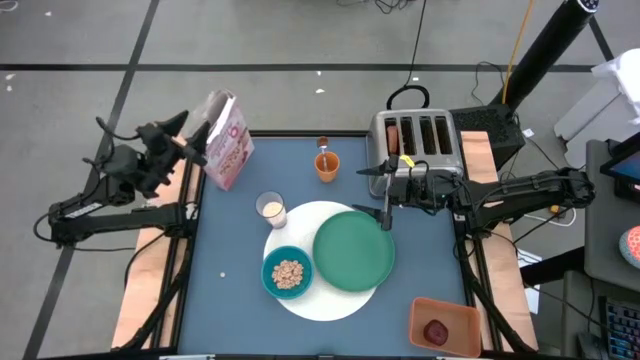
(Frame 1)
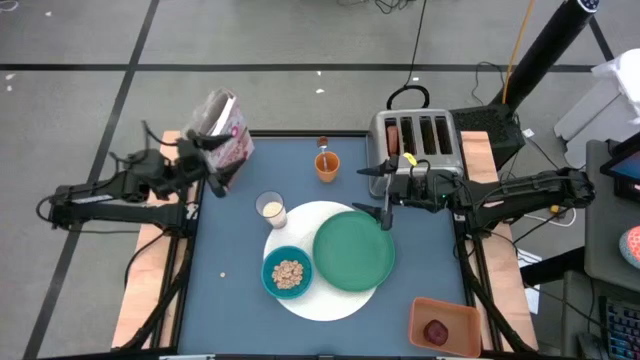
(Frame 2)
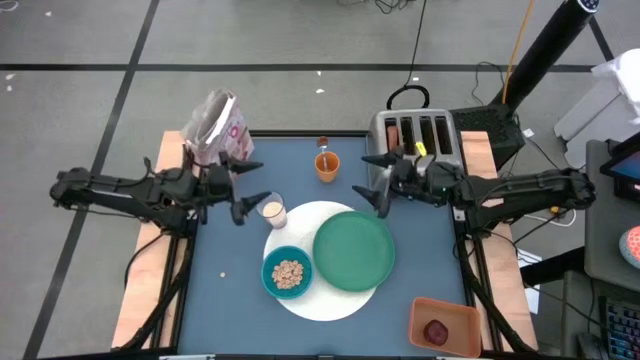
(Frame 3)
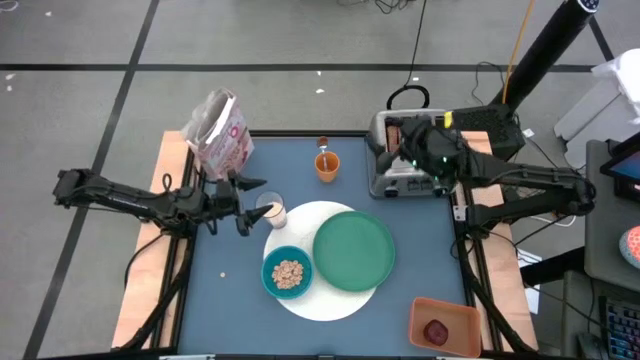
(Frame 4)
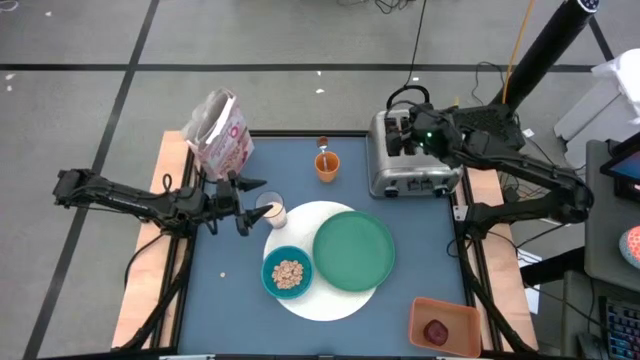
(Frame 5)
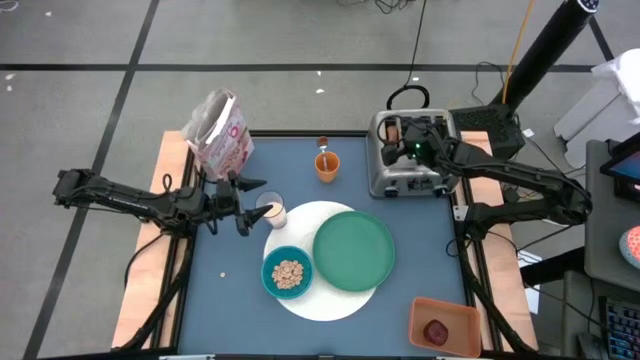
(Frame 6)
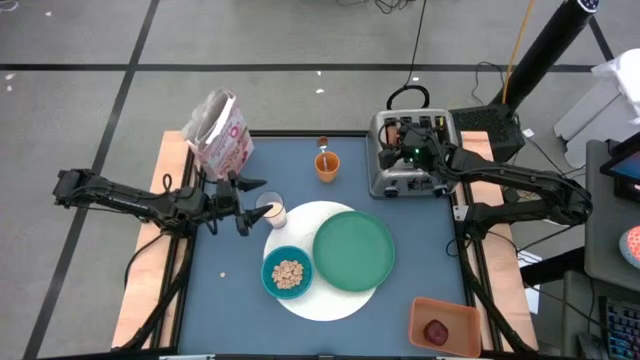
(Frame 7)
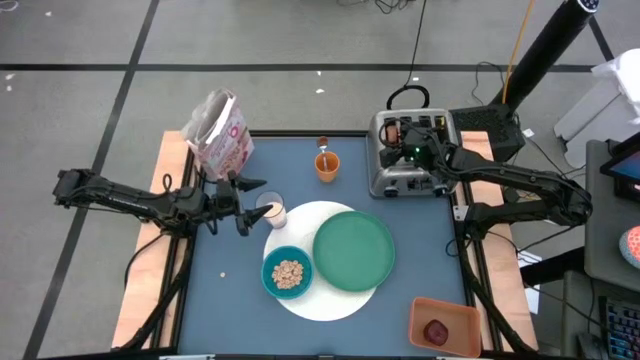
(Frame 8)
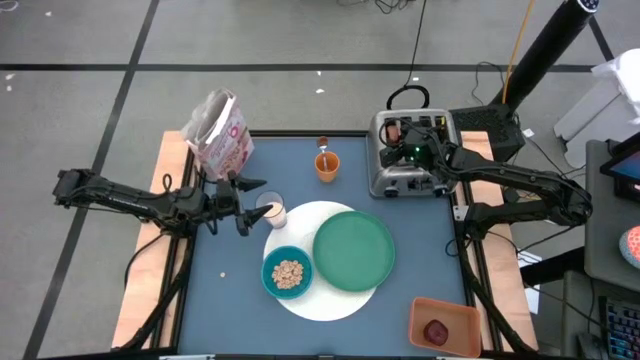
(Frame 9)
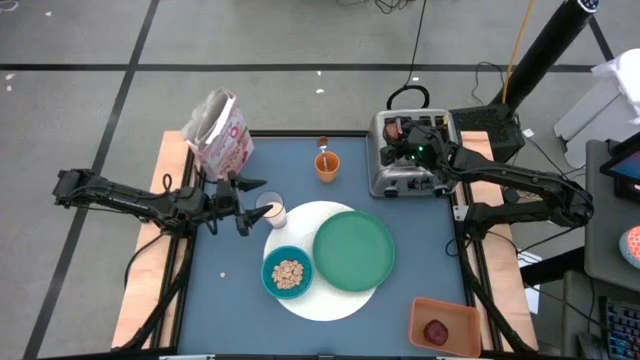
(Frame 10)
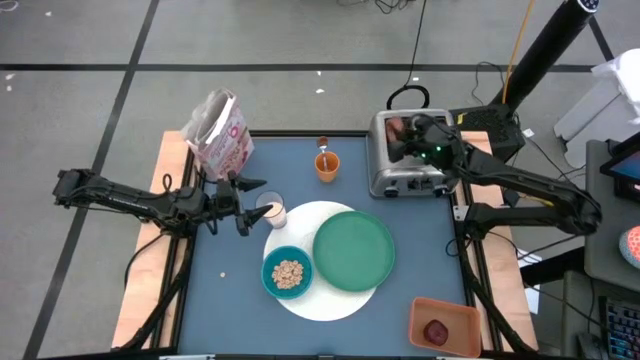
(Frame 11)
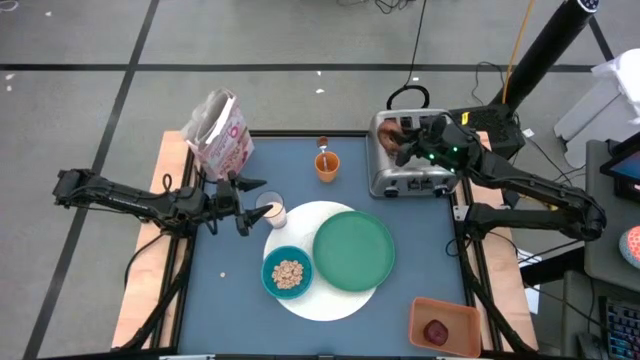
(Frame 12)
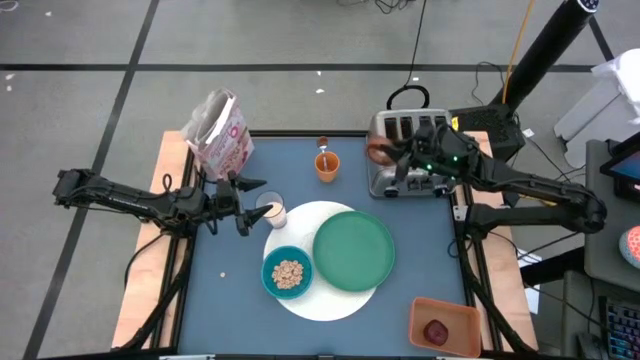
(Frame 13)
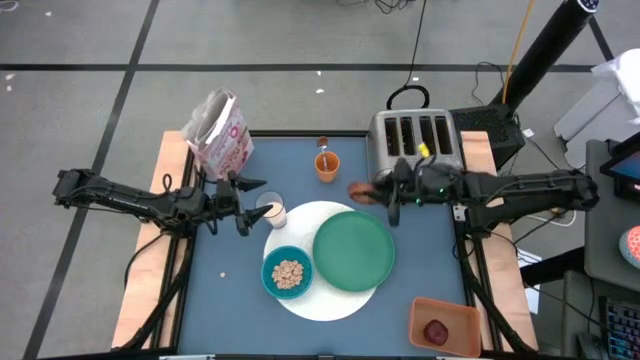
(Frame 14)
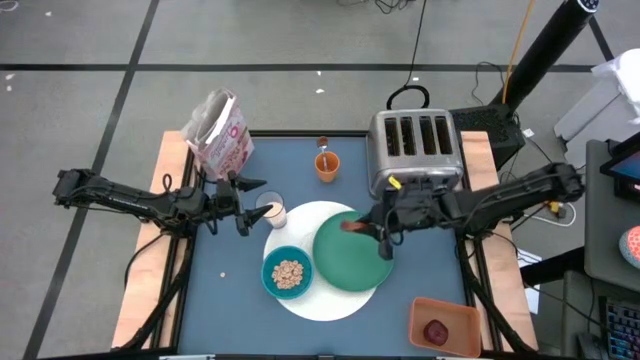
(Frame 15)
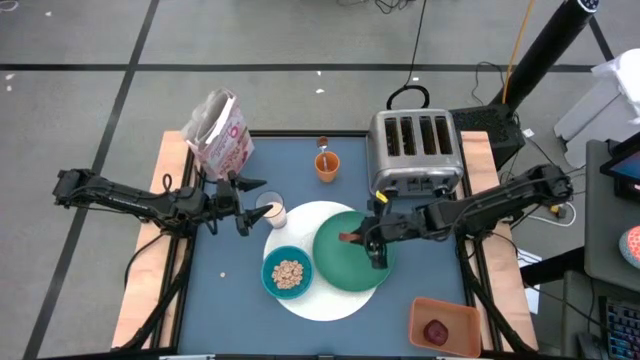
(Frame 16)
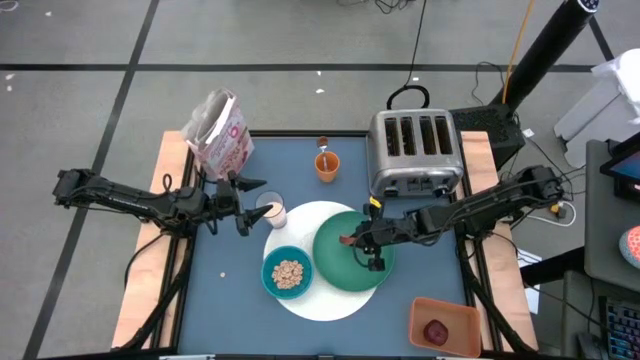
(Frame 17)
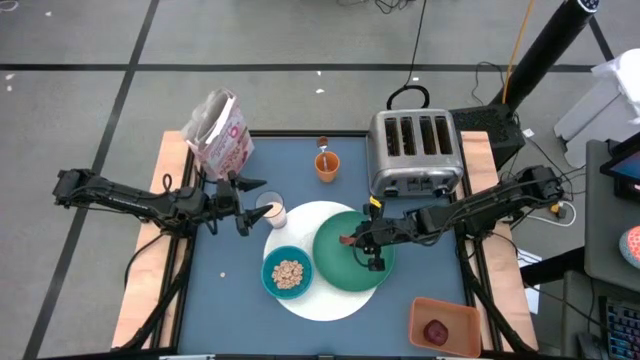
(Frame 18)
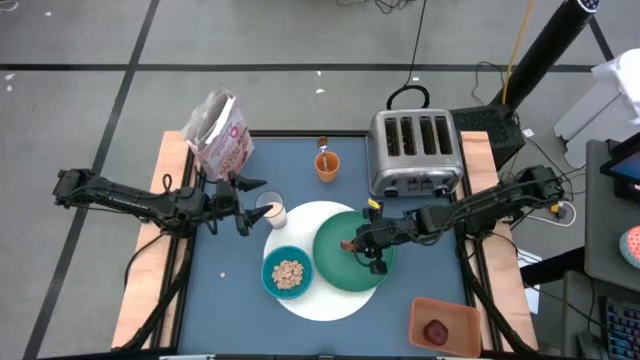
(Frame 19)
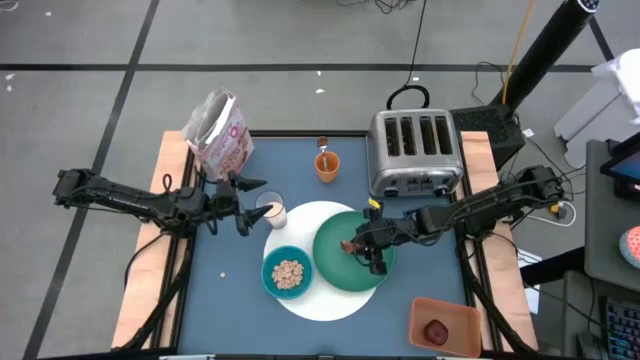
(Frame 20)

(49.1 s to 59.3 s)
Task: Arrange a breakfast setting
Put the toasted bread on the green plate

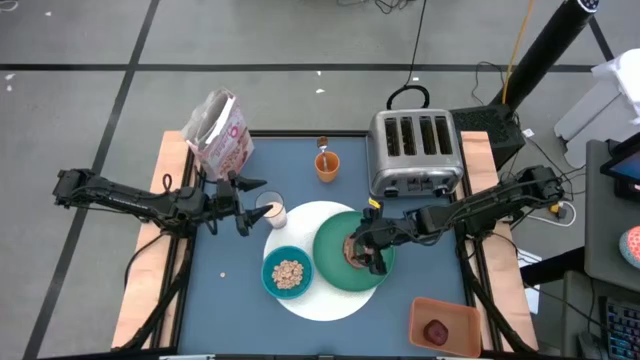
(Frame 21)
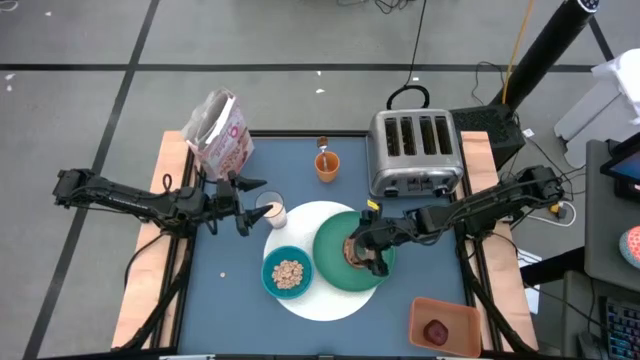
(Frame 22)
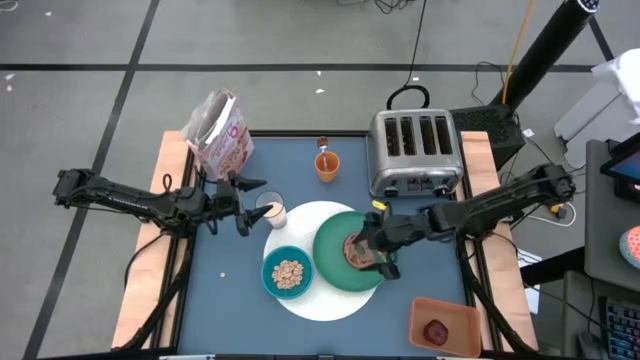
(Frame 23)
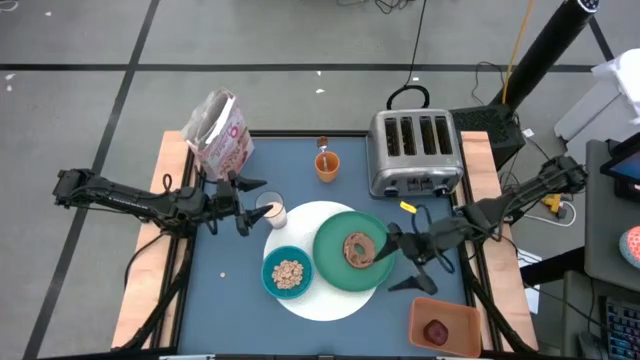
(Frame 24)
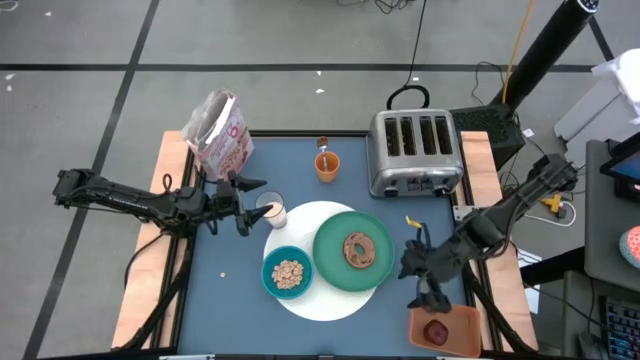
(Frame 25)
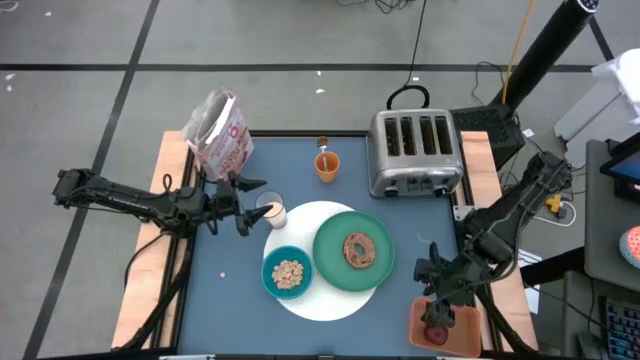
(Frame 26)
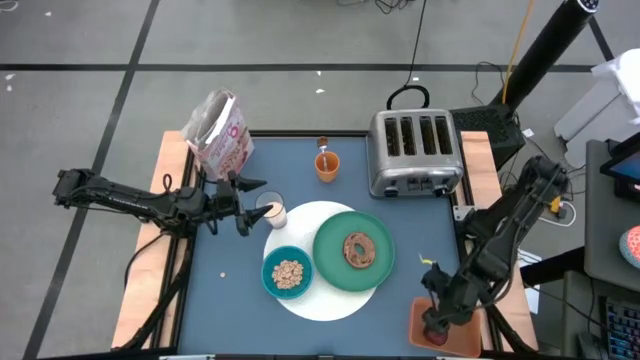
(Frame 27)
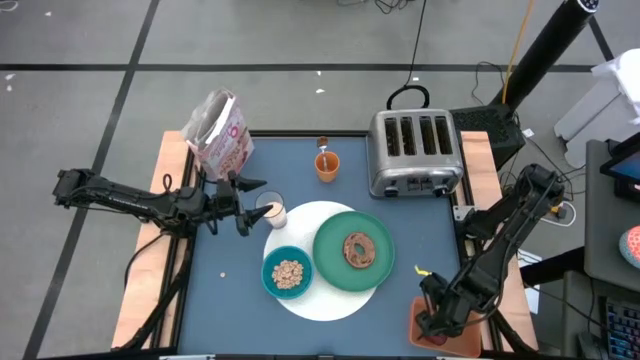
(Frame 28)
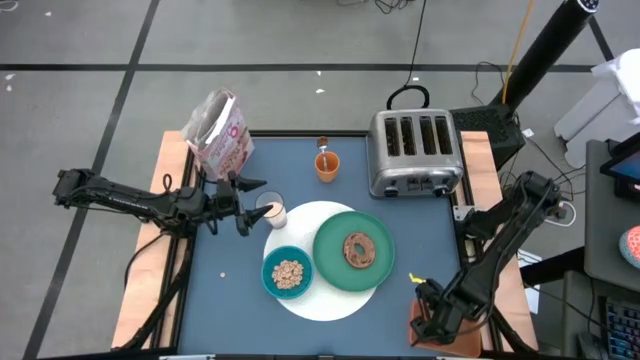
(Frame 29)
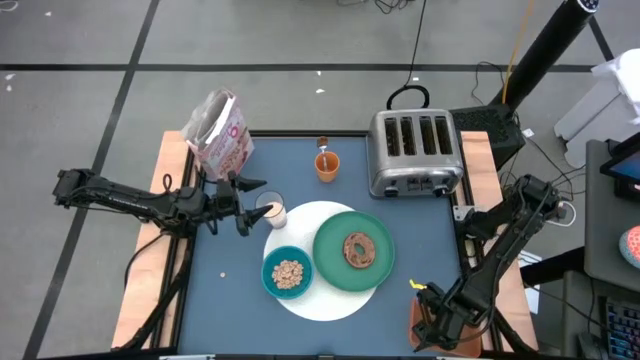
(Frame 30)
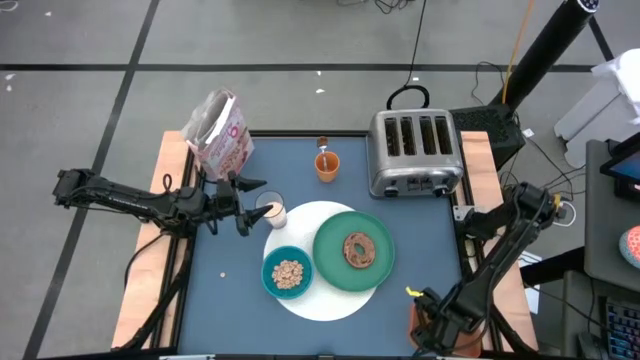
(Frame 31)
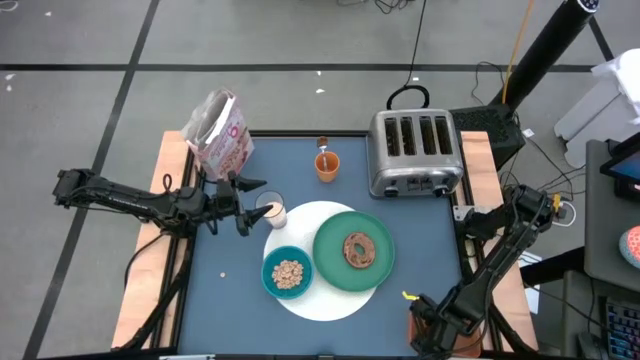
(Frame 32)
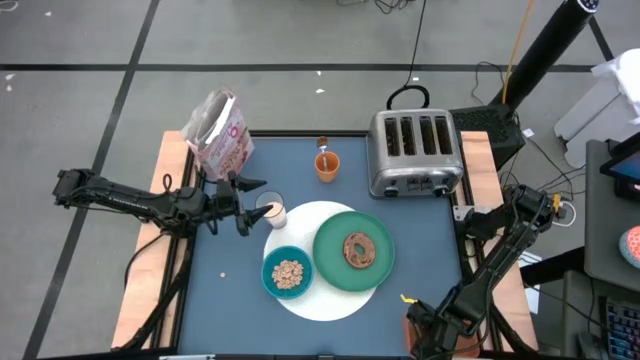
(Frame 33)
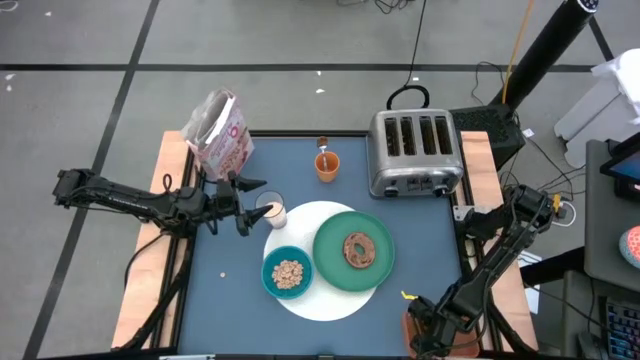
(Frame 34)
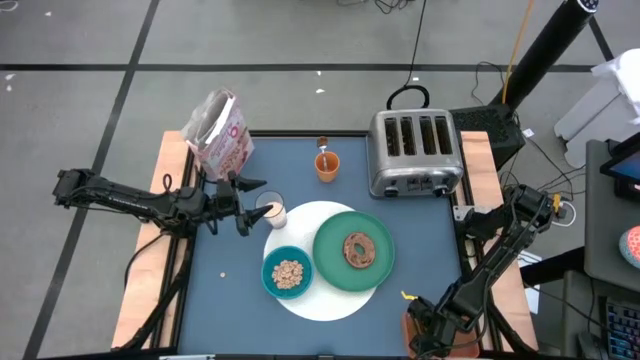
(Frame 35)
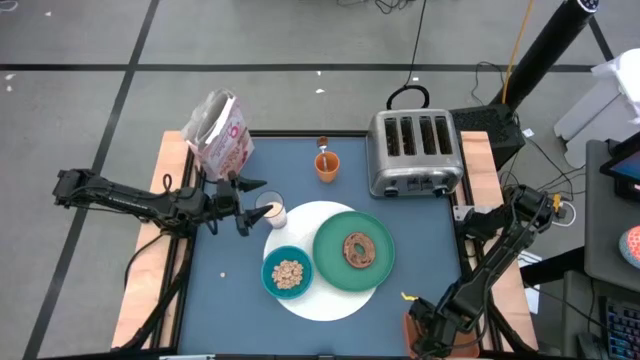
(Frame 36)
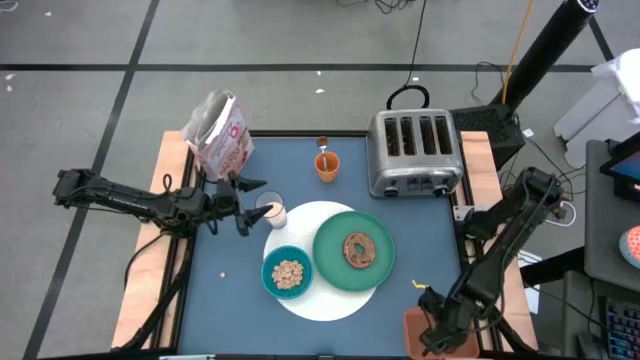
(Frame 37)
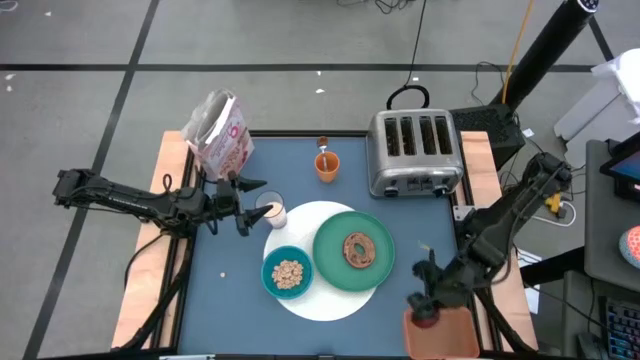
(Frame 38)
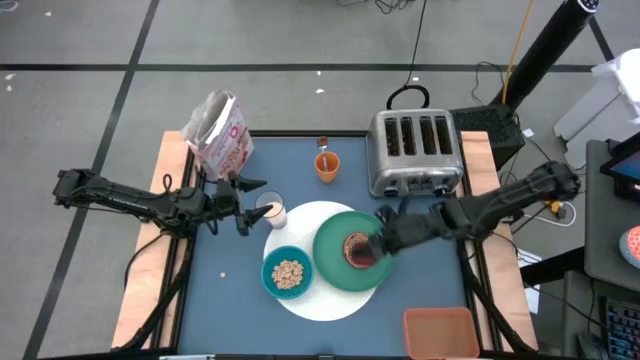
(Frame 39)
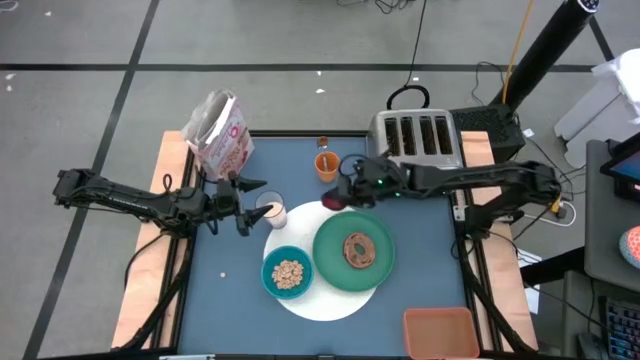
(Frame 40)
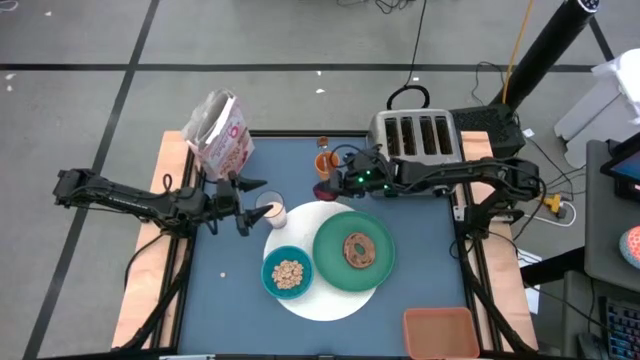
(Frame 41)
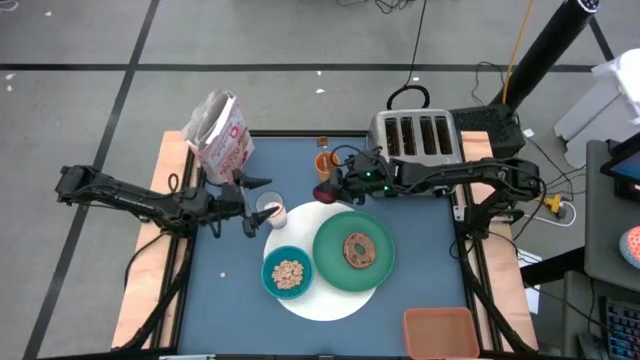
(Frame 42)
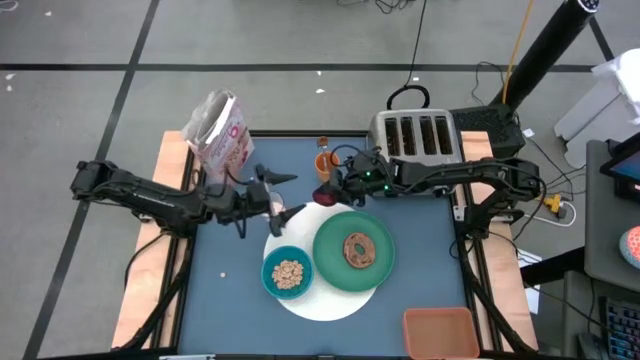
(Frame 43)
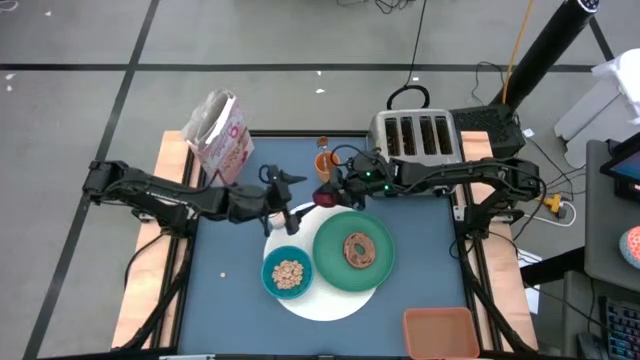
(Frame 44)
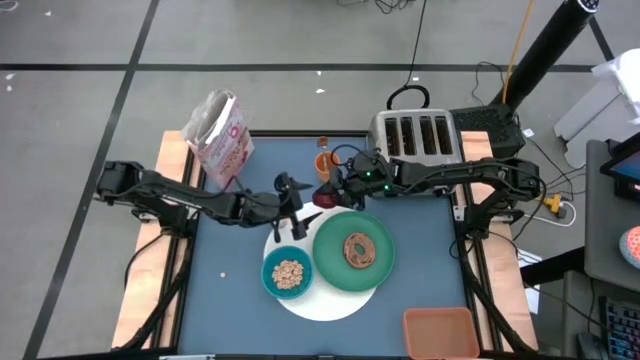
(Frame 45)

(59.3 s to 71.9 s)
Put the apple on the white placemat to the top of the green plate
